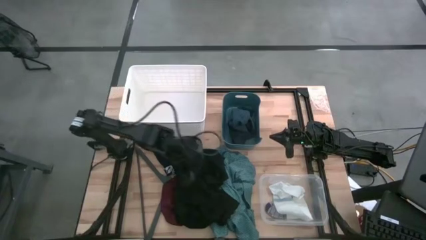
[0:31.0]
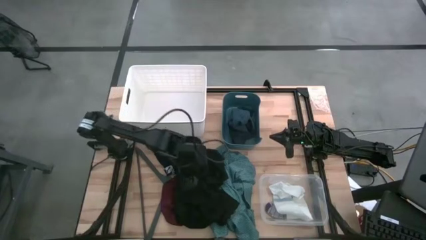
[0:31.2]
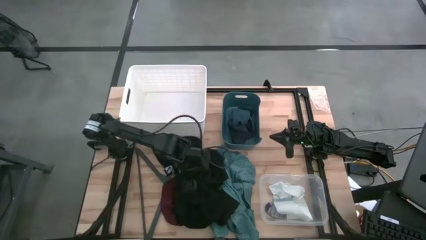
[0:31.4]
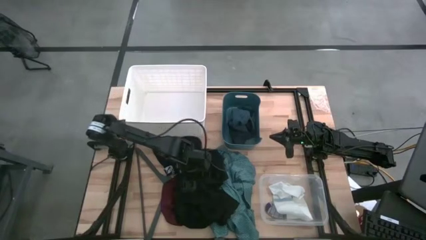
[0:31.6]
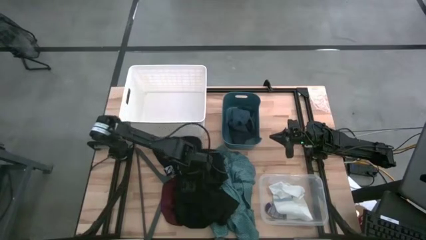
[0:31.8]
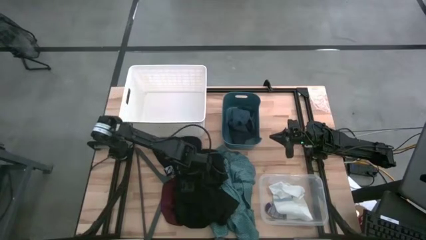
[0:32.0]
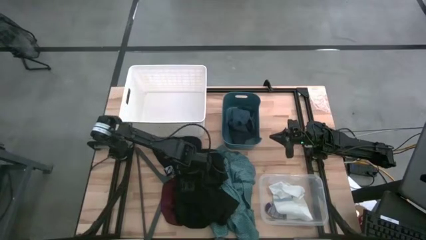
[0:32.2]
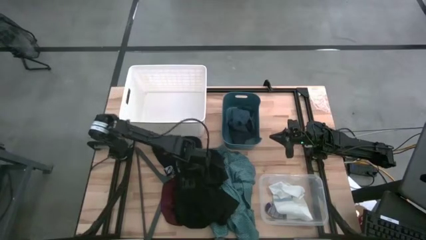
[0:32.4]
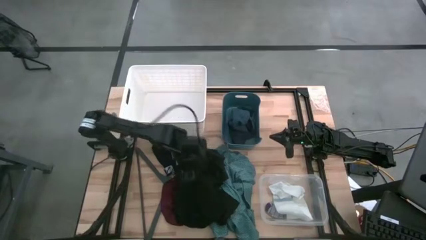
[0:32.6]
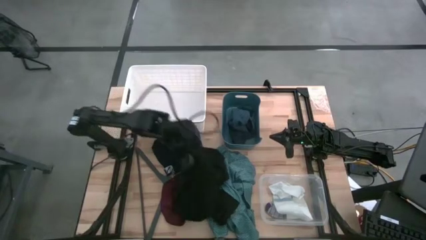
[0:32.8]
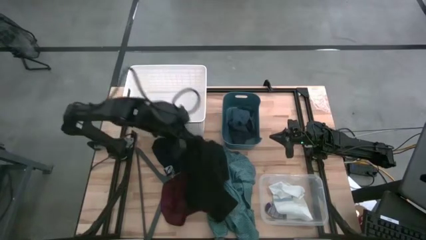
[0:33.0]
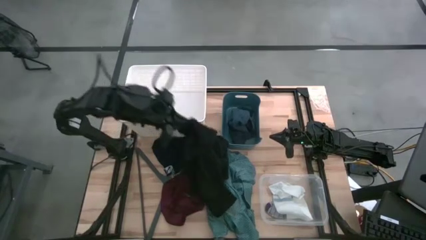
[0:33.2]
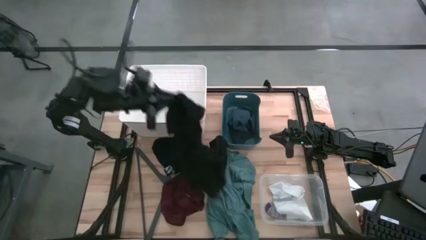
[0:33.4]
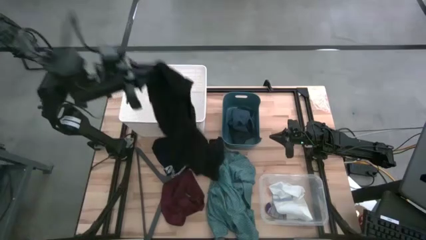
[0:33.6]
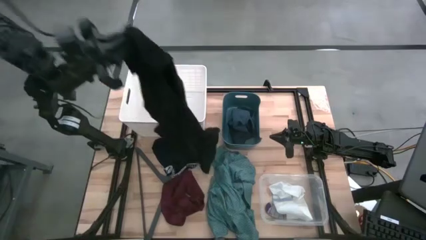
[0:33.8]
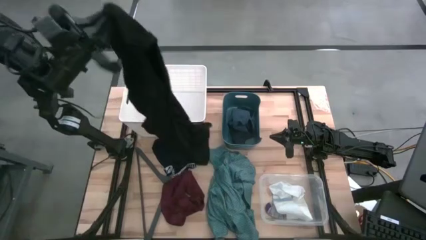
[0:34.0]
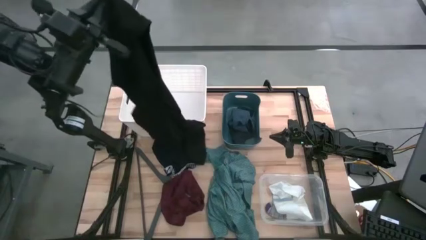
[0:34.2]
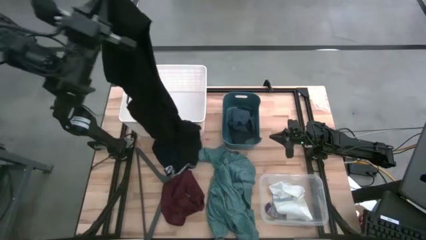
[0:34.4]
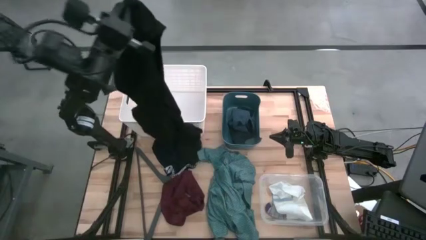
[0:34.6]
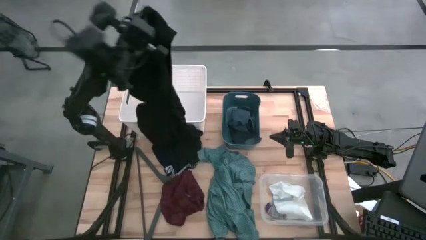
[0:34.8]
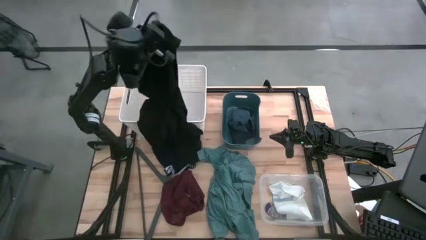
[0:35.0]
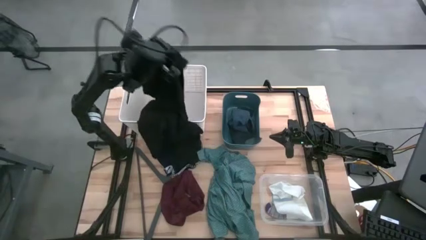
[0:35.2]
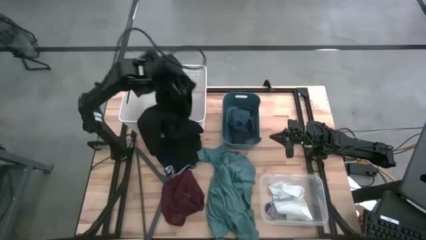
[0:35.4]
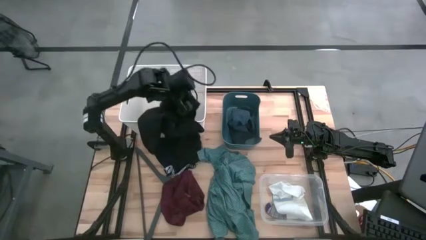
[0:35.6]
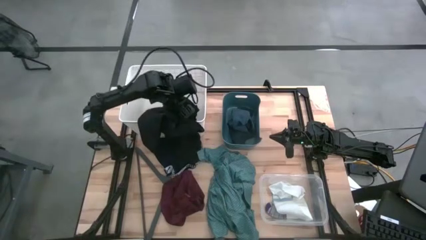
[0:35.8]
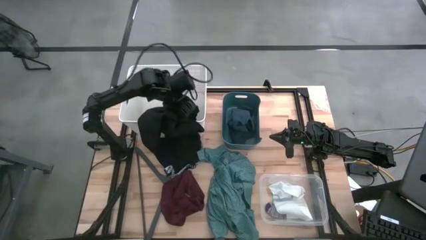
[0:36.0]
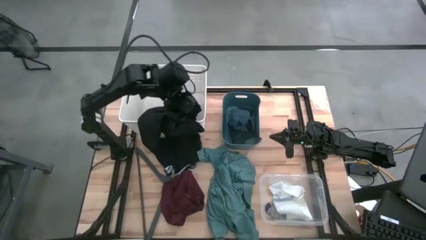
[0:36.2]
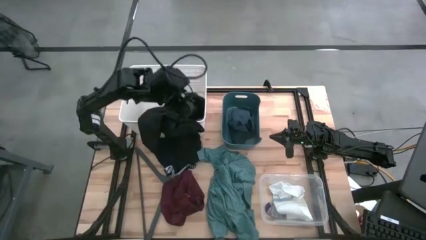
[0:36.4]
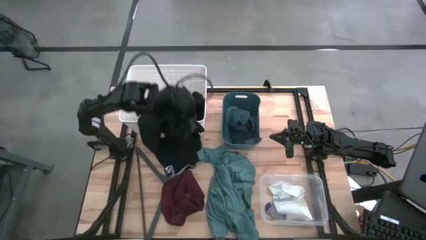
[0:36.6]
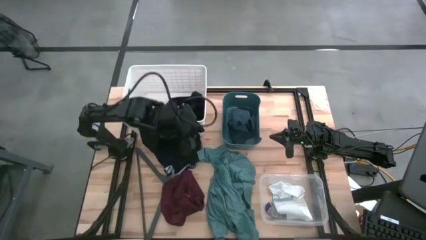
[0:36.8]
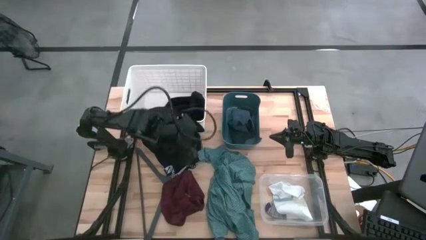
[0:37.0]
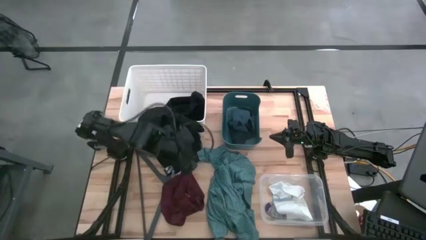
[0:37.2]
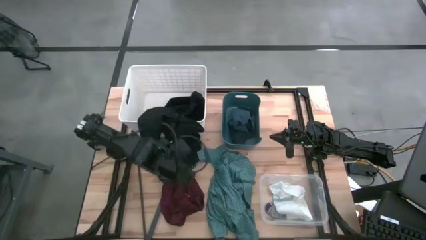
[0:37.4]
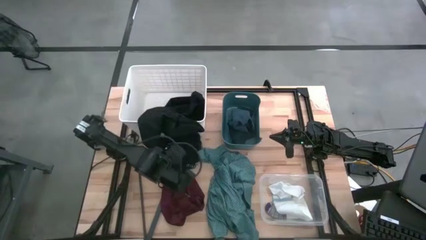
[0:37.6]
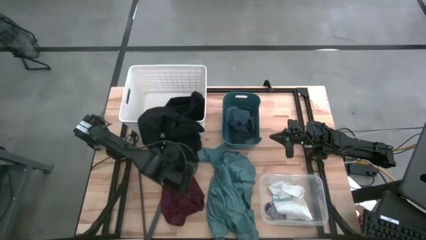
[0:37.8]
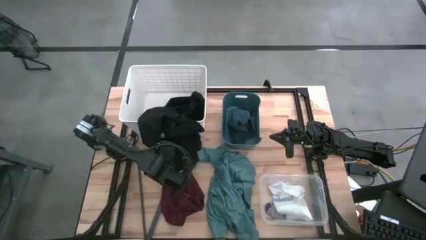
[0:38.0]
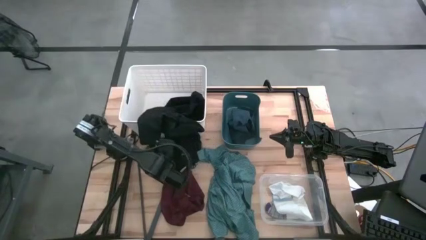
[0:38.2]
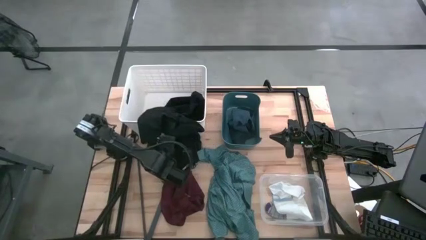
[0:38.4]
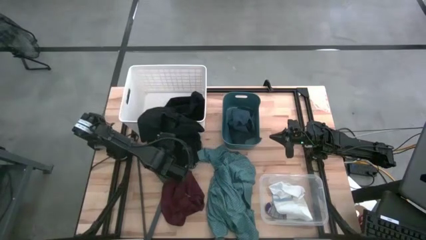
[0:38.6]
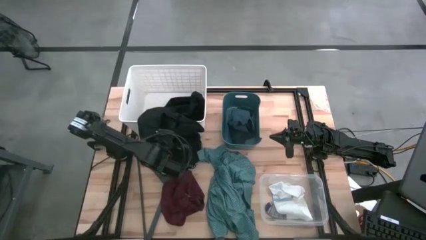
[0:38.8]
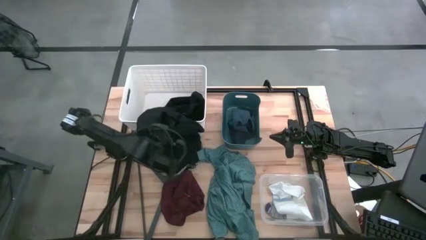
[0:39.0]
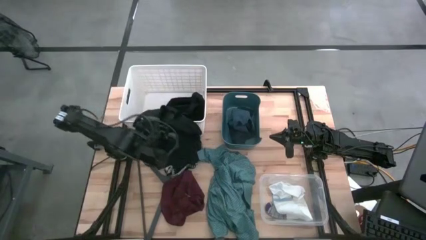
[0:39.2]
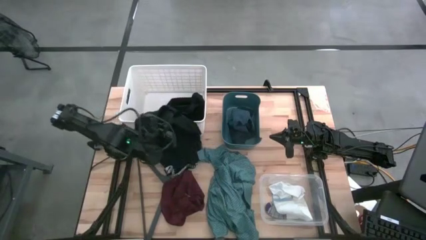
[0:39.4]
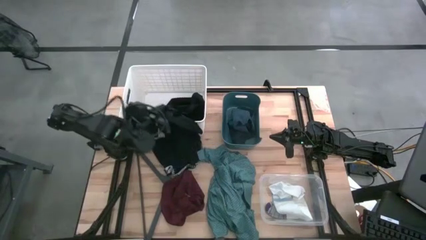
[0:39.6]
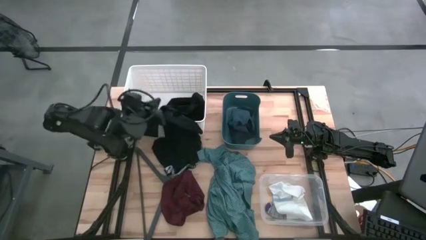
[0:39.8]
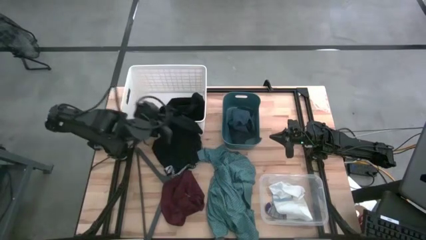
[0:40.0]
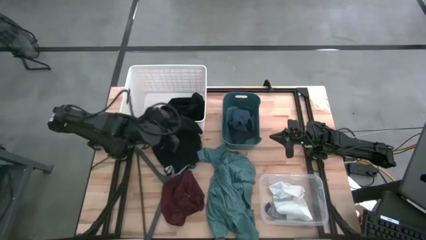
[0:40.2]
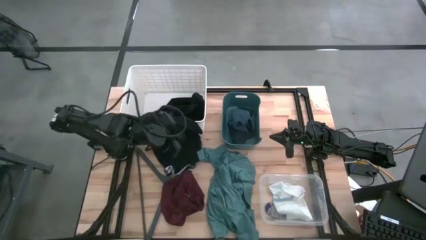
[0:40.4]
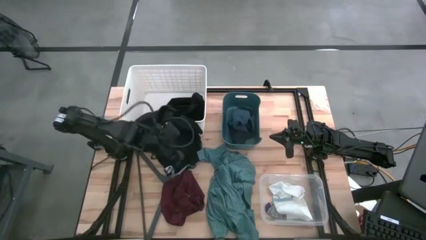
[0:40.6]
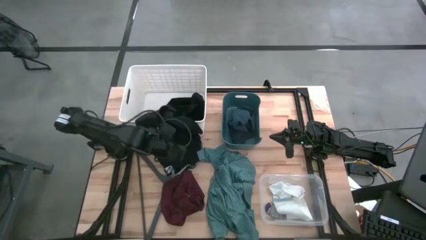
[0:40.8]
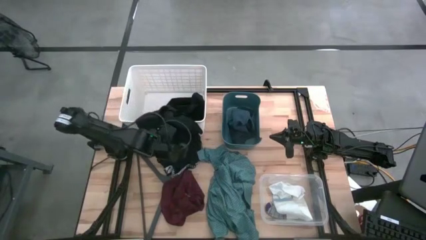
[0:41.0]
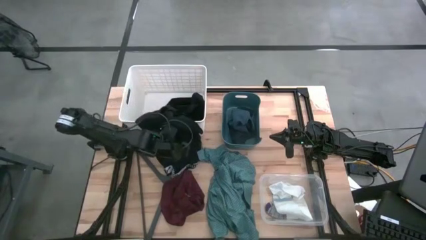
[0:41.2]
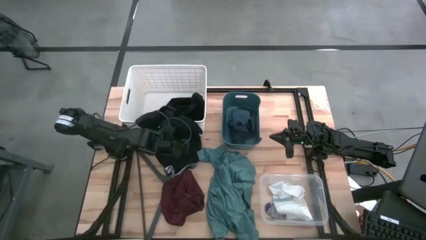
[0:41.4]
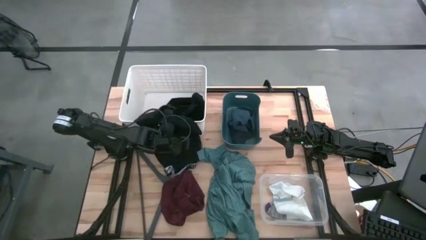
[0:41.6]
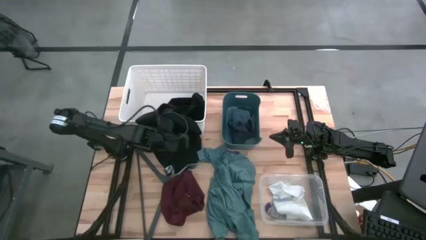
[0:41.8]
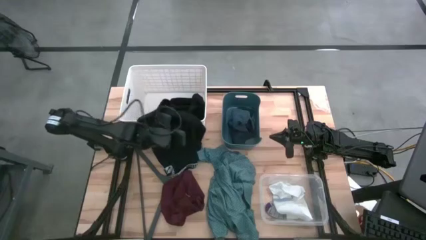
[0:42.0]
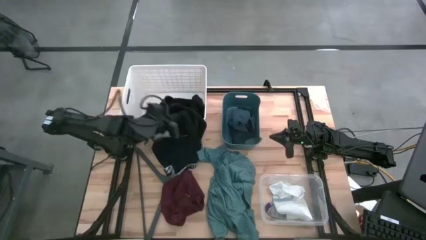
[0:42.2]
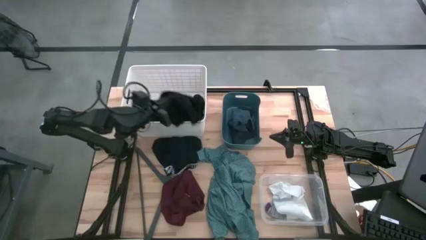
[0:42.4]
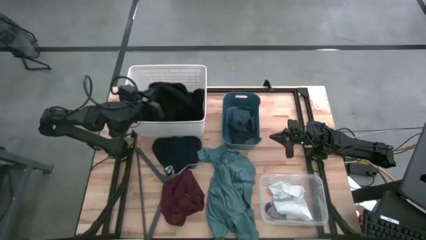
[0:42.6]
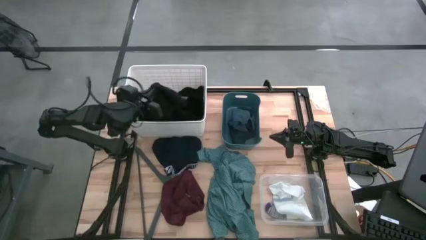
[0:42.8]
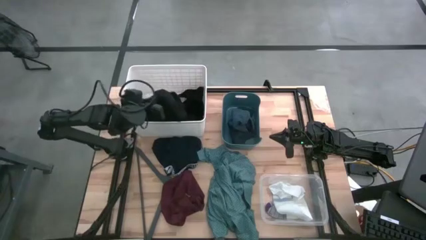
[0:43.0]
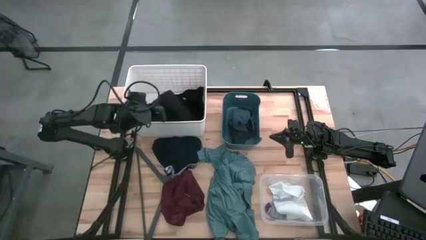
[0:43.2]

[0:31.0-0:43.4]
Task: Pick & Place Cloths
Put the black shirt into the white basket

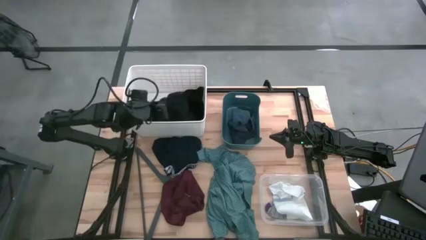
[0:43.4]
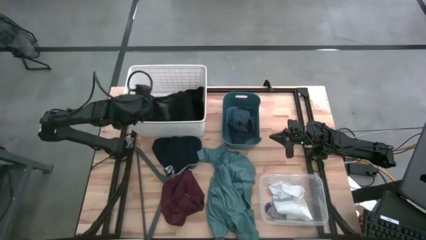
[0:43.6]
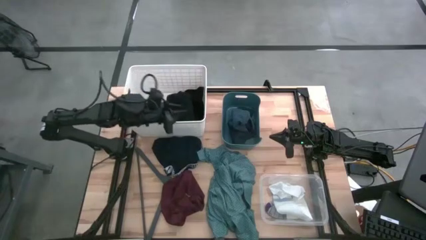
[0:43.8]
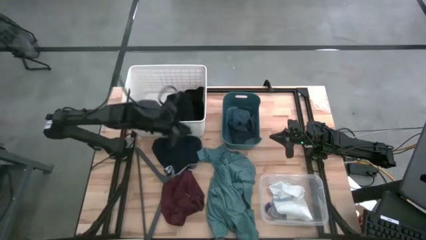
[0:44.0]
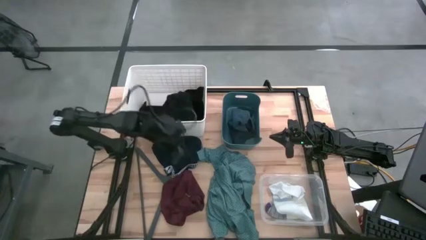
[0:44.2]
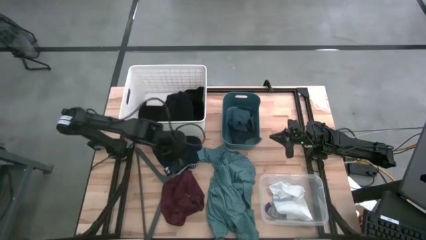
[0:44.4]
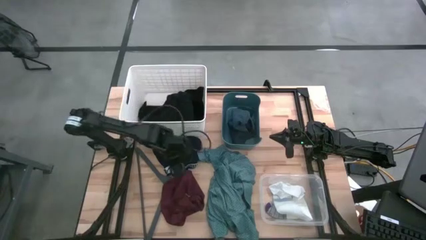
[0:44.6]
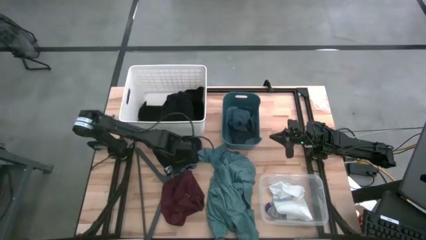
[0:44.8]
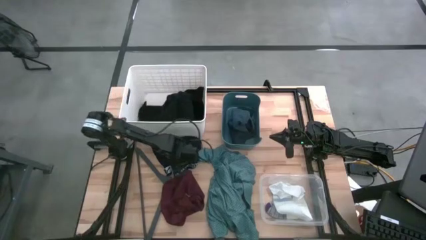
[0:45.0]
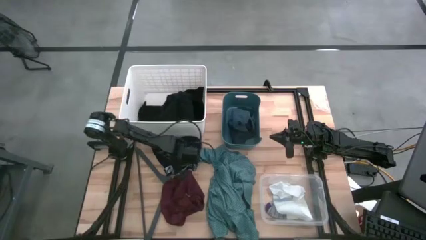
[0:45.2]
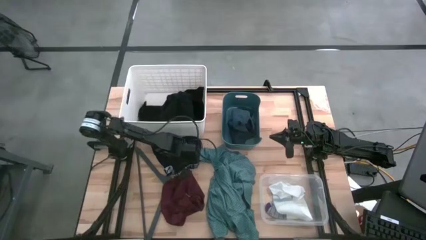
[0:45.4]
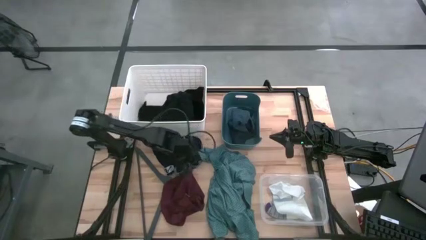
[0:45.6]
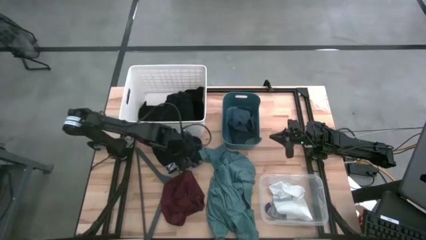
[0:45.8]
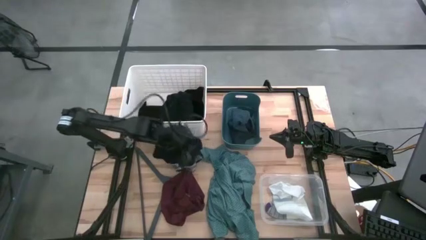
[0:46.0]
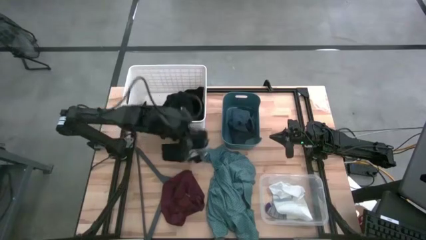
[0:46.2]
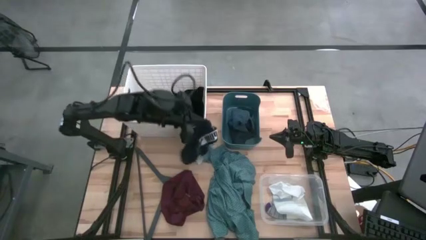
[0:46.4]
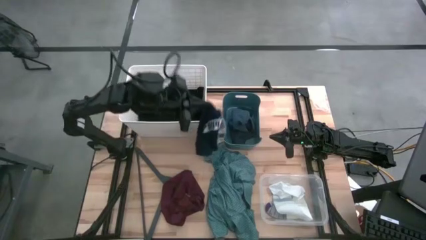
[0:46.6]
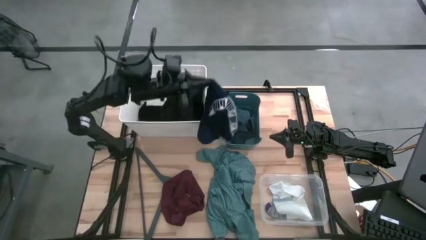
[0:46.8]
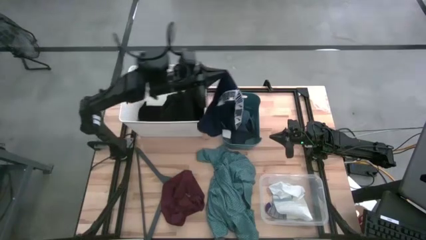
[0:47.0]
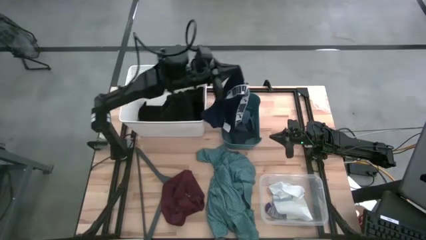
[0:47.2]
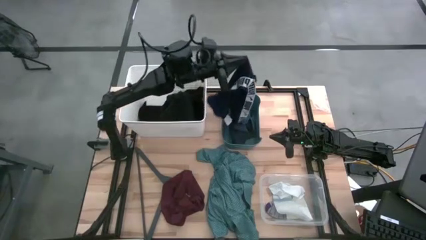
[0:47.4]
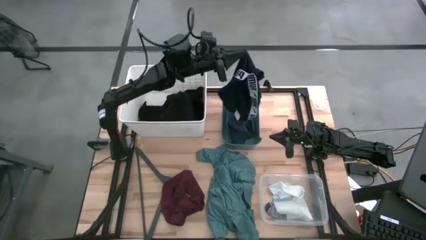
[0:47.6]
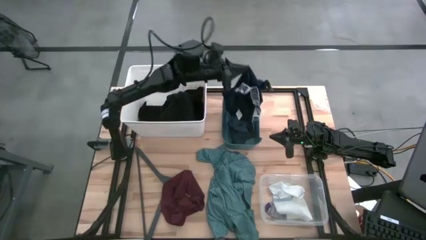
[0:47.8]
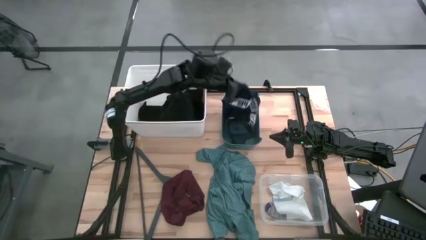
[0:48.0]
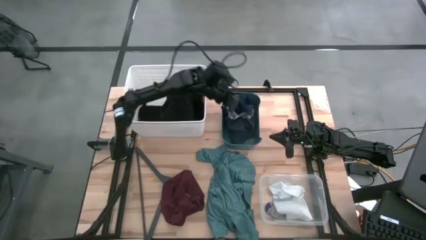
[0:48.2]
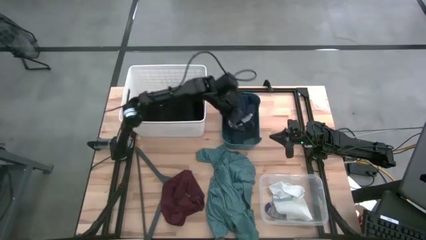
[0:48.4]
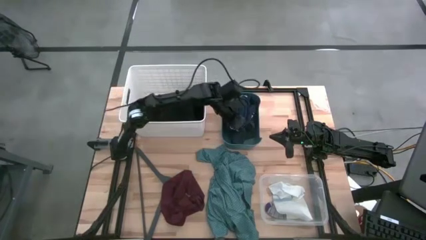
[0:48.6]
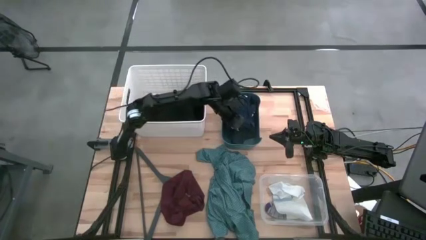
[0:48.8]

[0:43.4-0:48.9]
Put the blue boxer shorts into the blue bin
